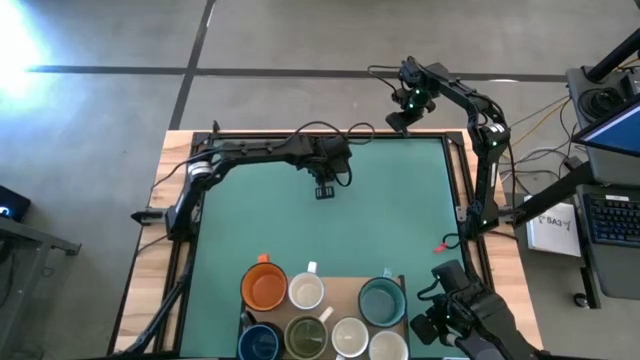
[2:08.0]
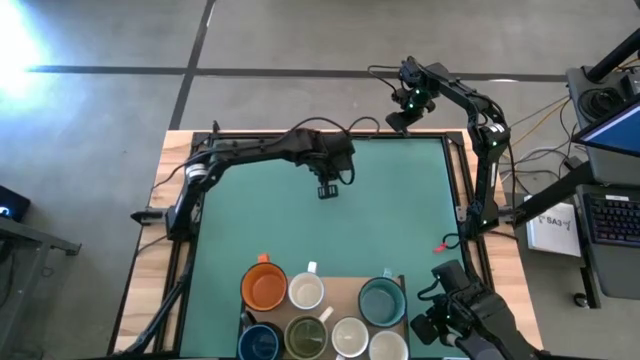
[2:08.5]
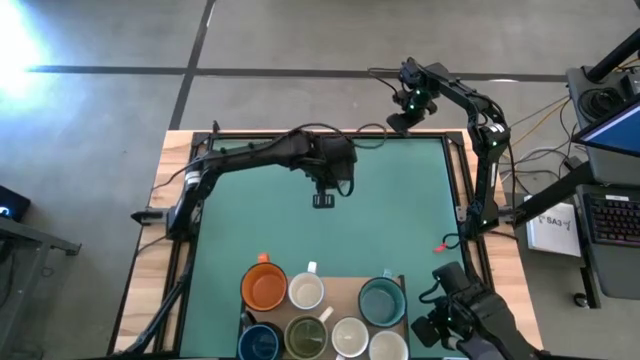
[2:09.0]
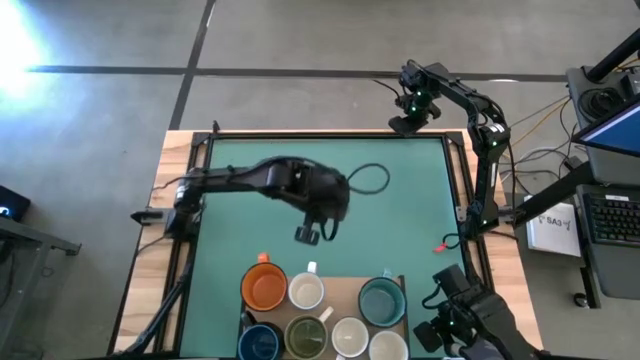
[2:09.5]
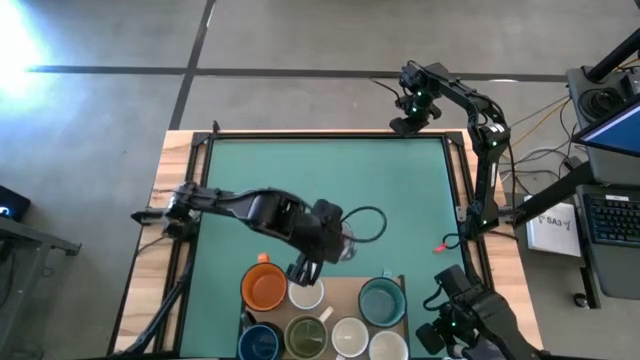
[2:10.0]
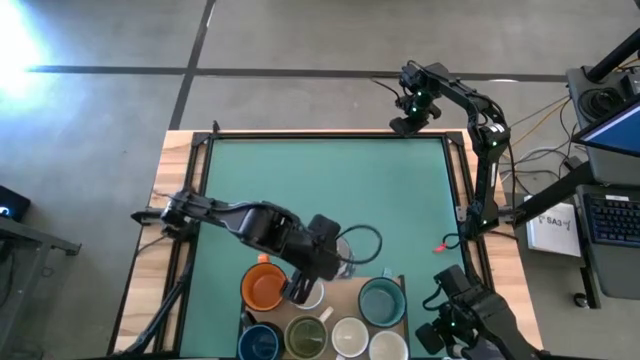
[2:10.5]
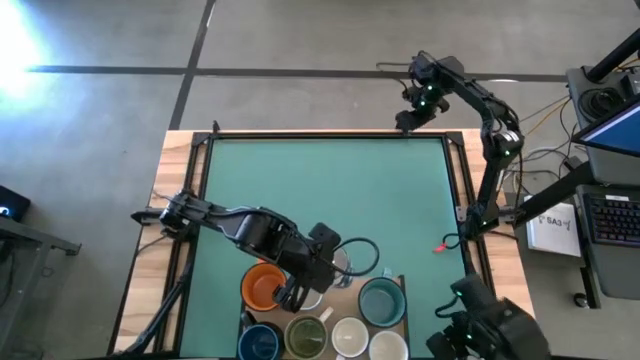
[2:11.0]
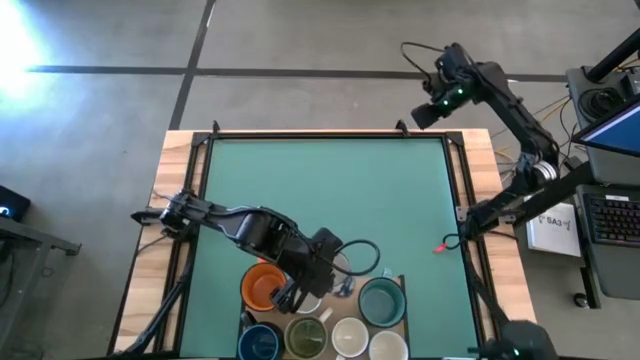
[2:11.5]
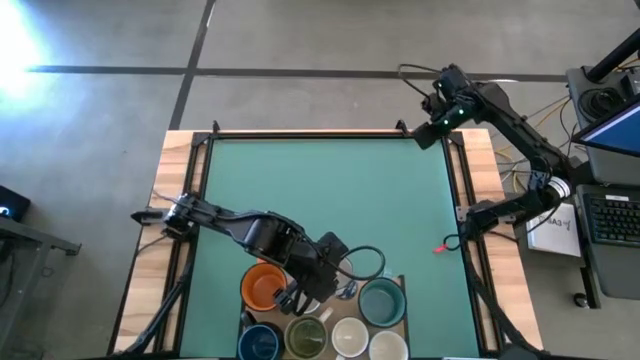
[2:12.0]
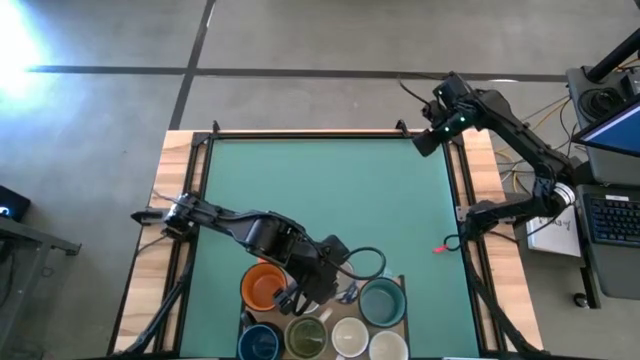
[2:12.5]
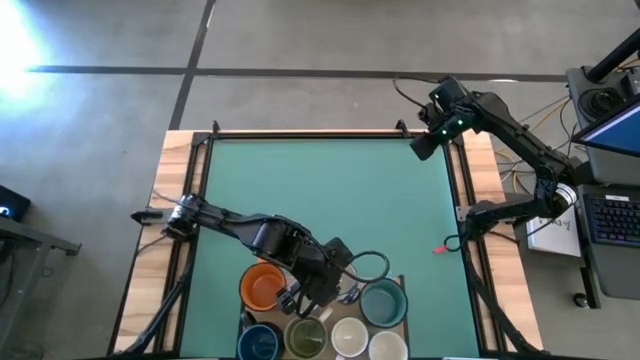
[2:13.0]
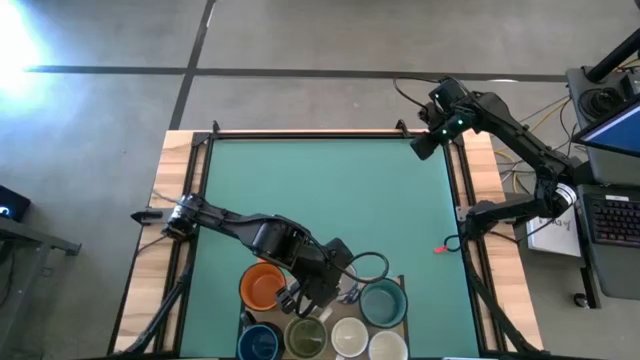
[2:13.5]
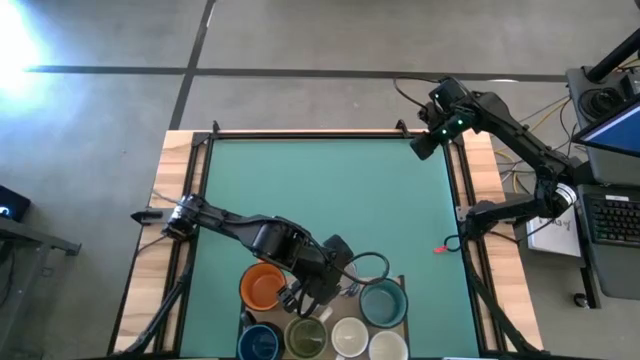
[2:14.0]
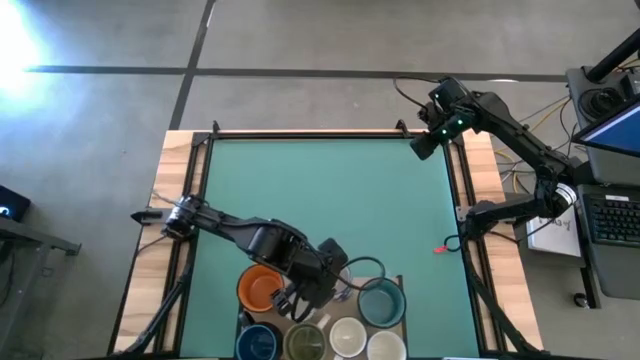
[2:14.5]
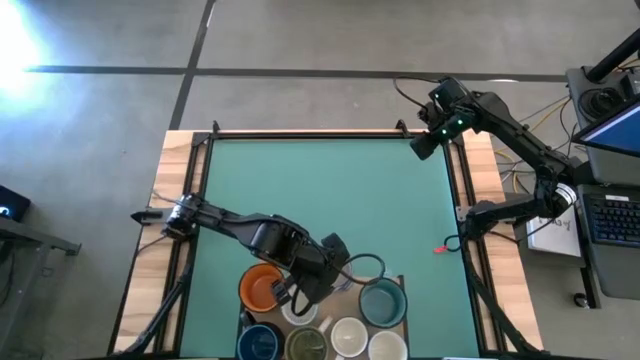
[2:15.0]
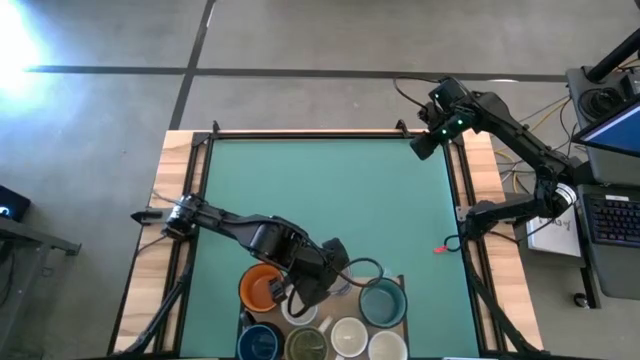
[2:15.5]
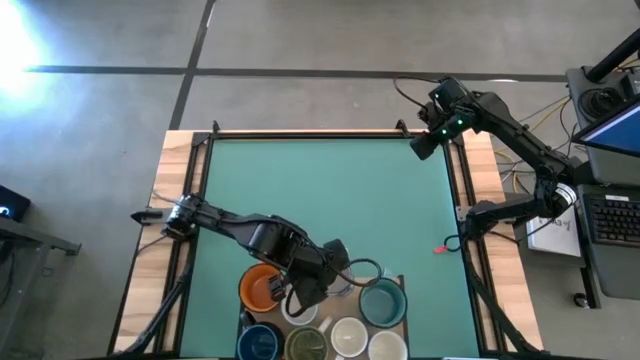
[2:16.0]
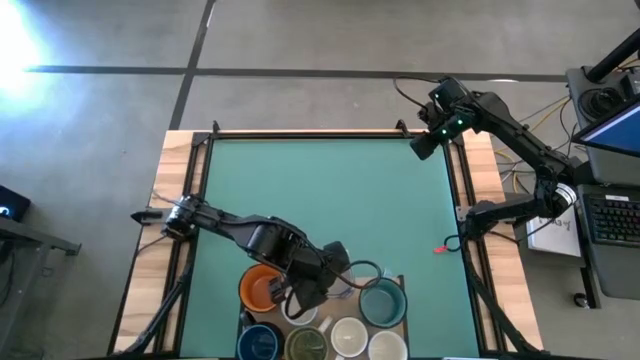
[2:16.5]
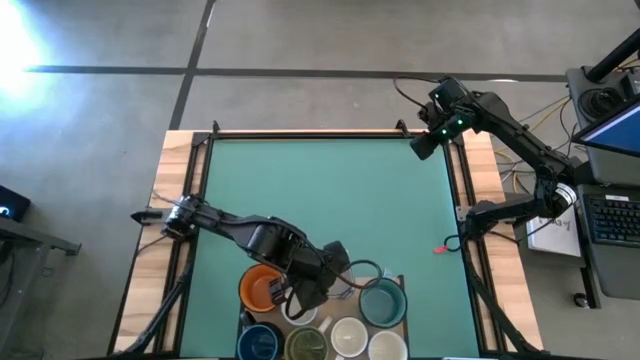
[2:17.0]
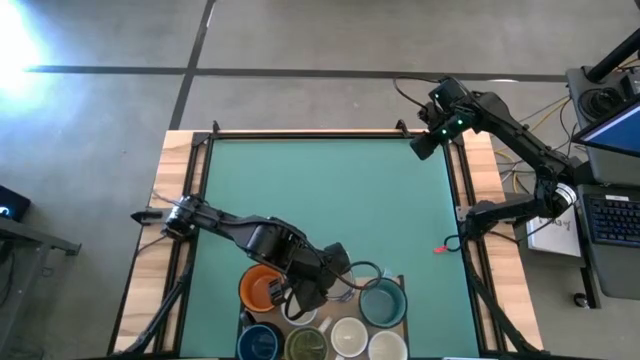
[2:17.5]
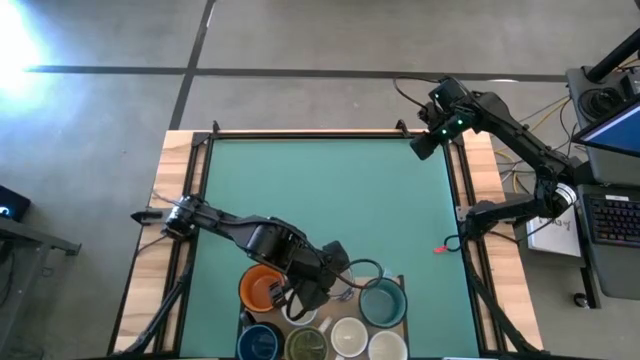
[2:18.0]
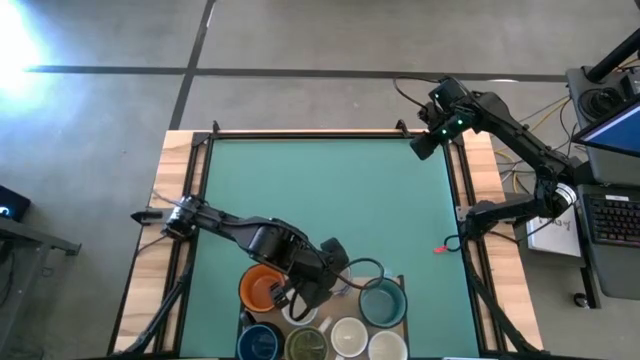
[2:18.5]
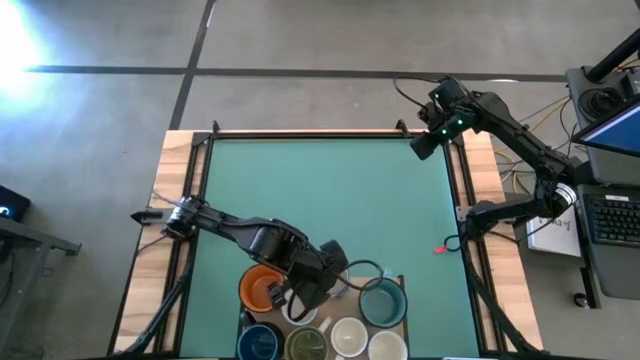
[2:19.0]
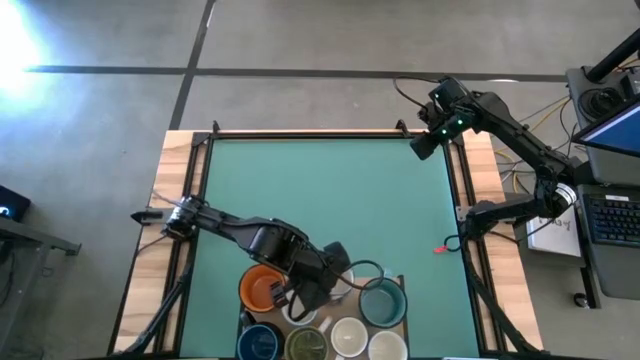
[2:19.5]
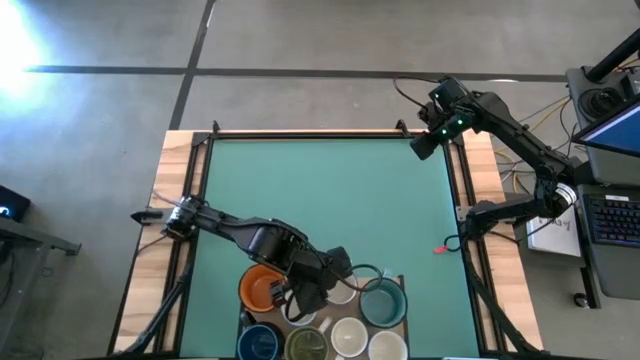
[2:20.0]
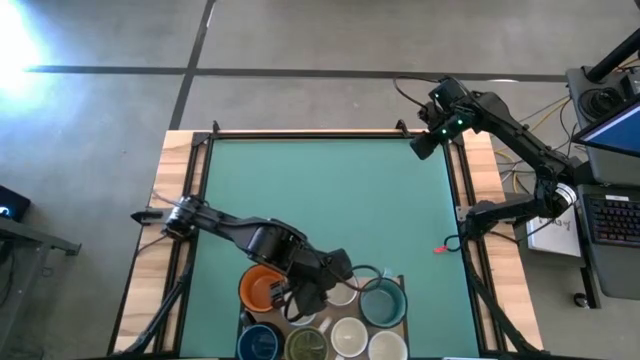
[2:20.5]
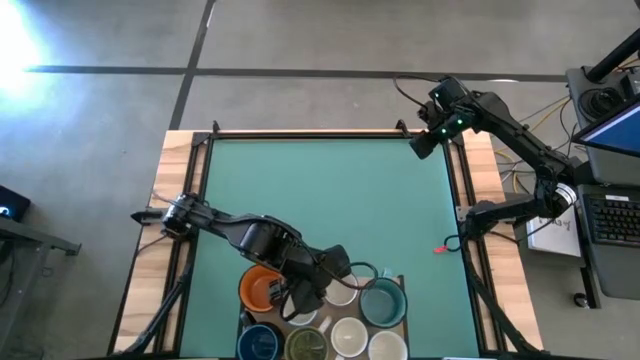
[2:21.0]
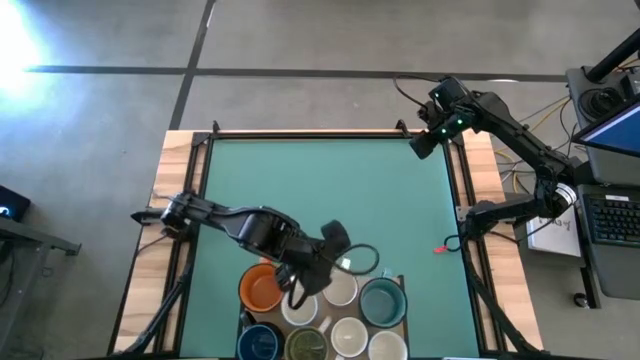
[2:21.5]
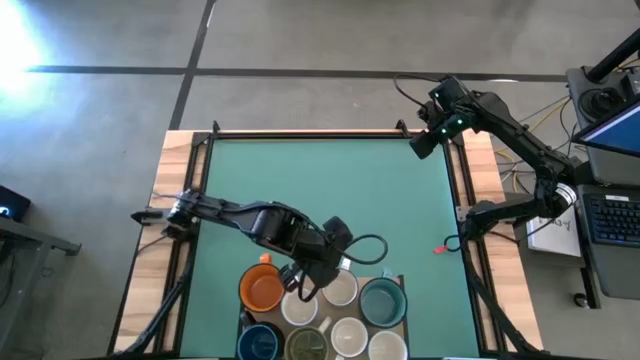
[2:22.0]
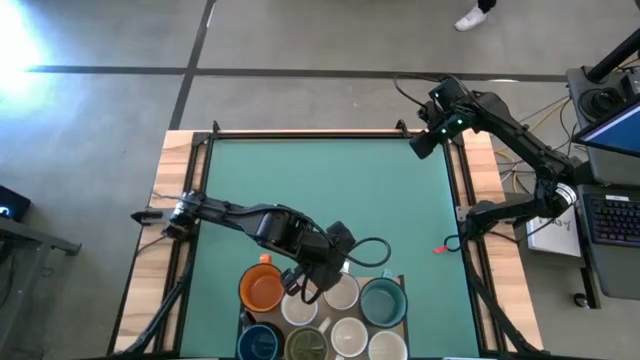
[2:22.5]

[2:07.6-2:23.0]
Task: Place coffee mugs
Put the blue patterned mug on the shelf

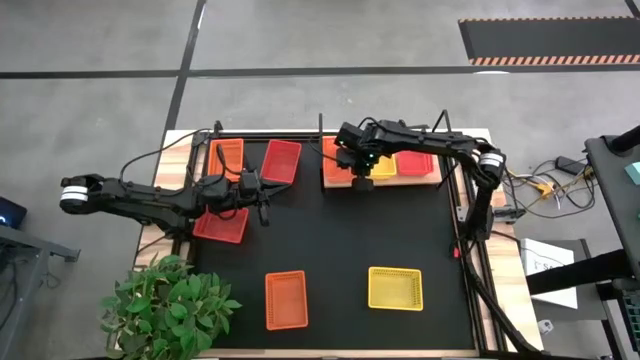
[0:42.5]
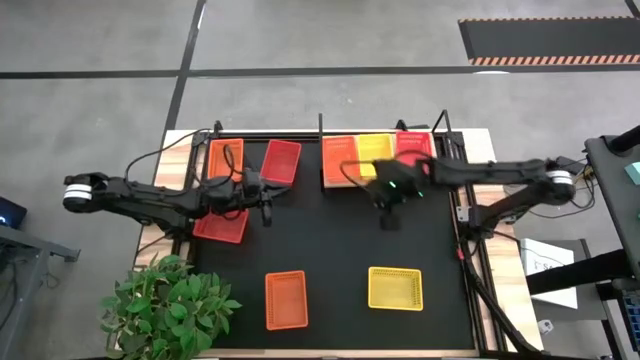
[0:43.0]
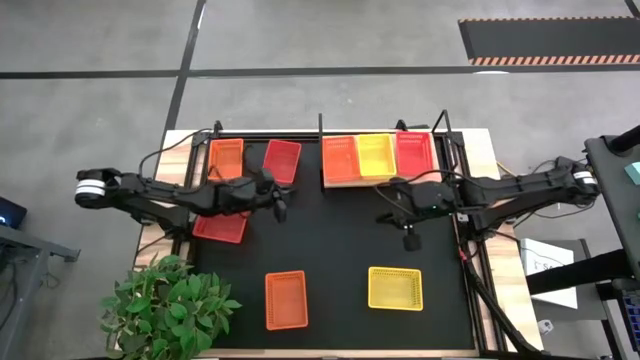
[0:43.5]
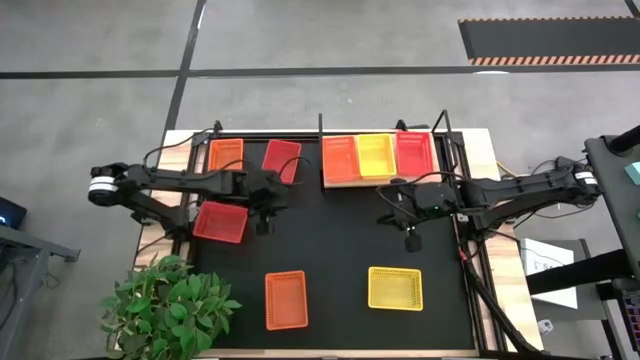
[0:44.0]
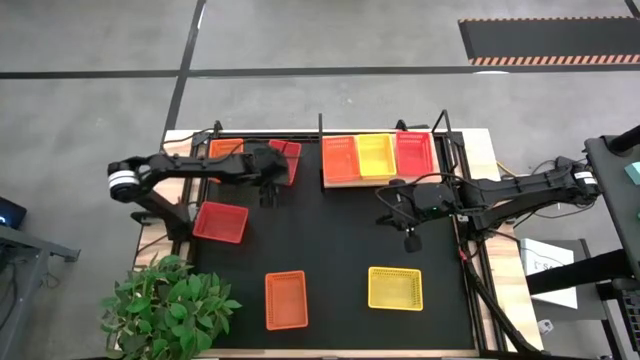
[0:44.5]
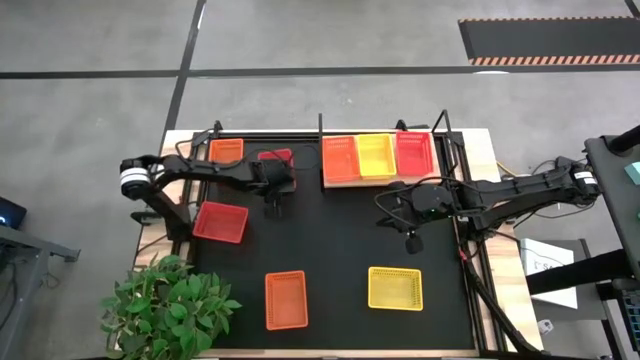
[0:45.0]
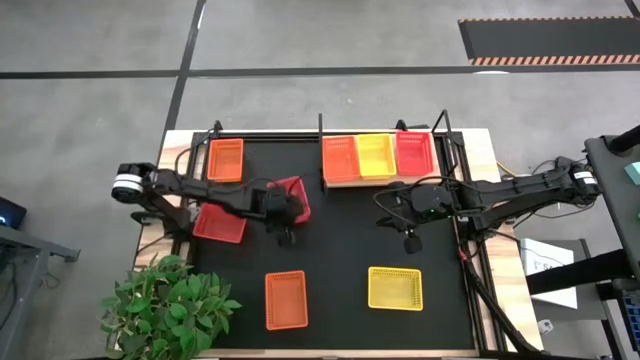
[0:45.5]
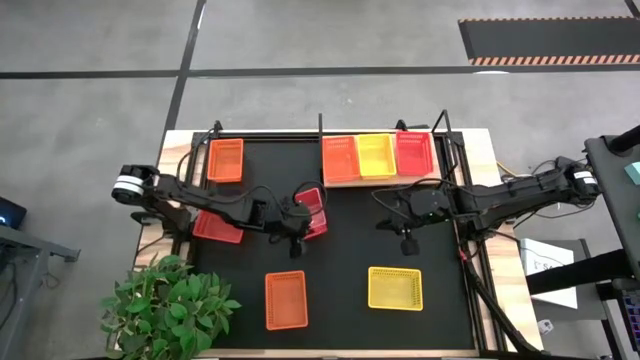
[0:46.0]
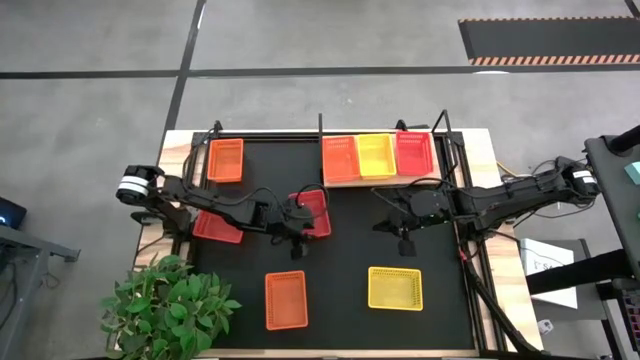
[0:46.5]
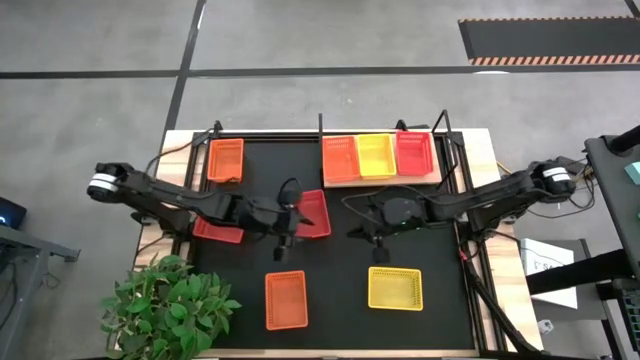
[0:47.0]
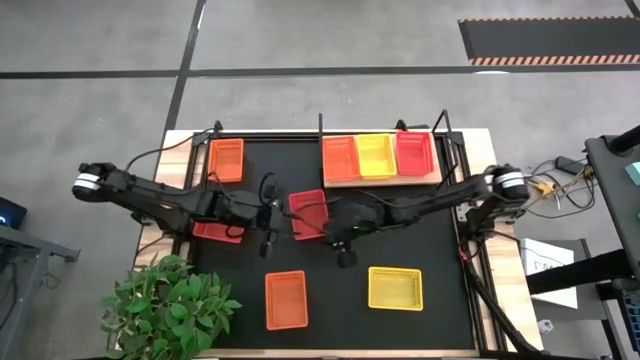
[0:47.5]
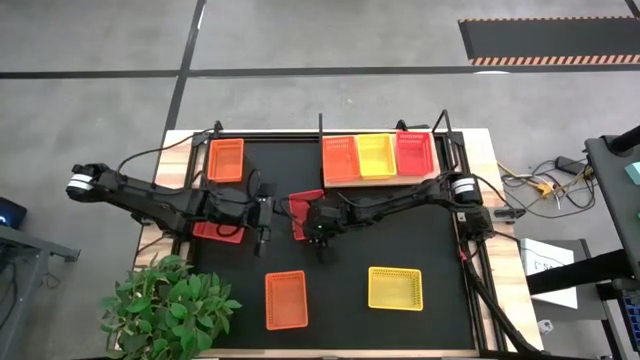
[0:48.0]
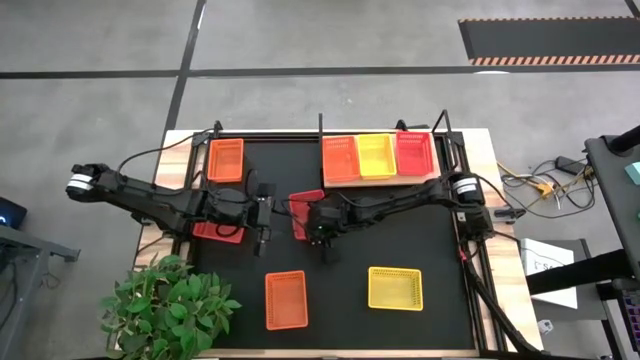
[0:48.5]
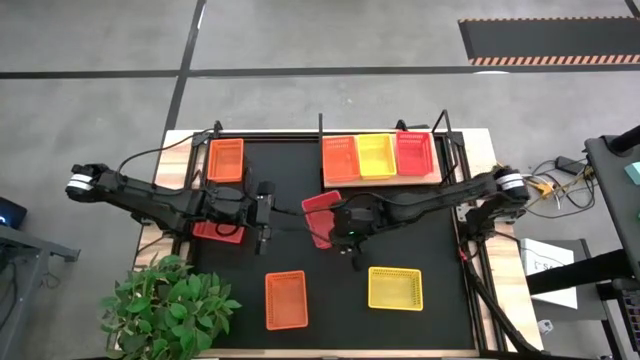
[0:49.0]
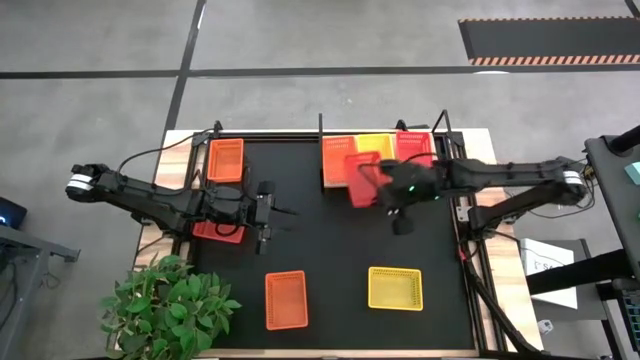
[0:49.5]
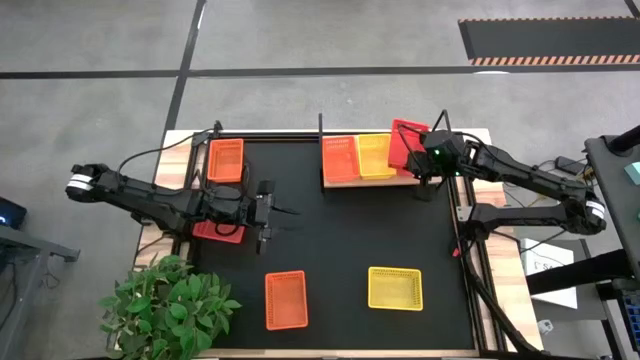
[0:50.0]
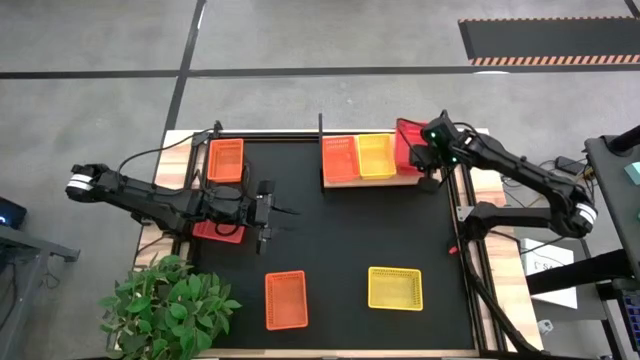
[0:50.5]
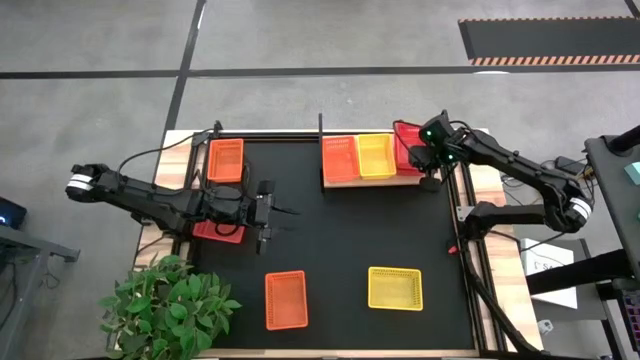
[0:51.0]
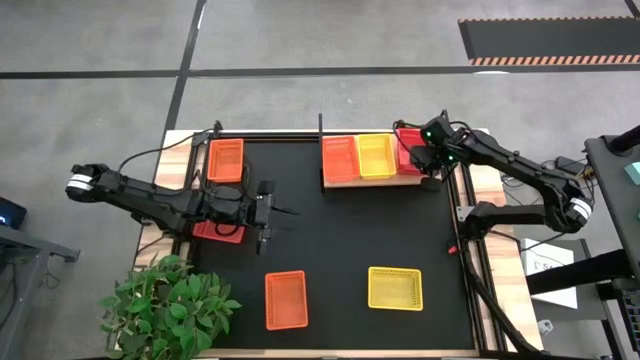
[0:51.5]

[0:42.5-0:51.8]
Task: Stack baskets on shelf by color
Stack the top red bin on the red bin on the shelf
